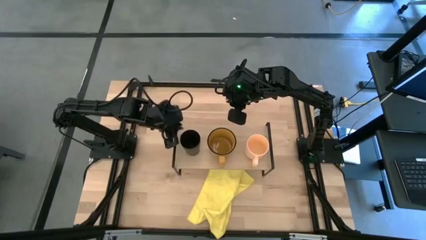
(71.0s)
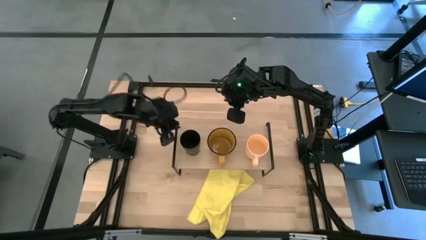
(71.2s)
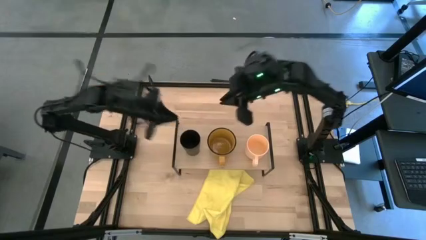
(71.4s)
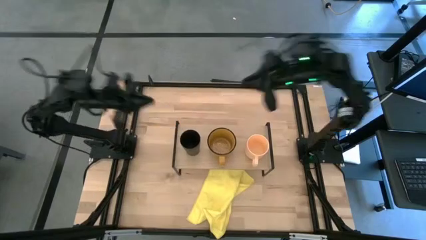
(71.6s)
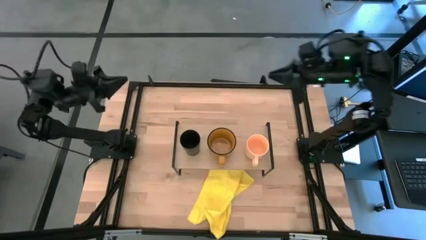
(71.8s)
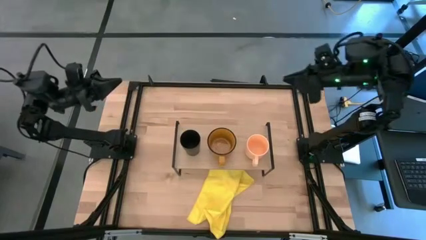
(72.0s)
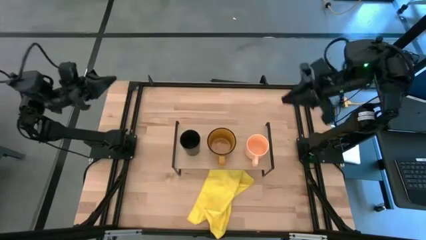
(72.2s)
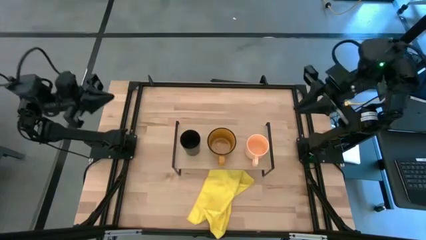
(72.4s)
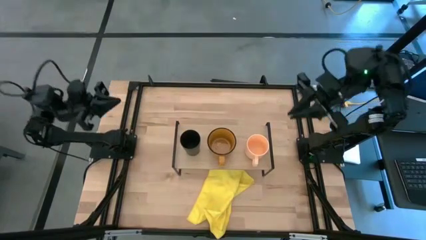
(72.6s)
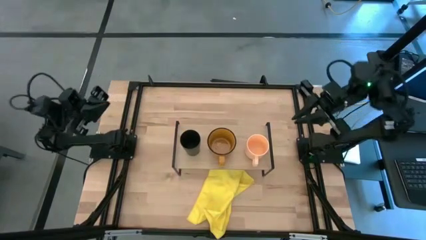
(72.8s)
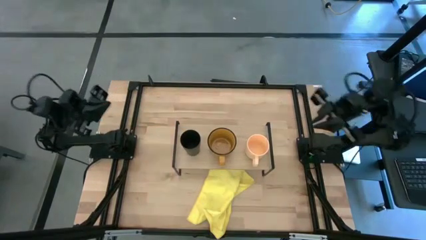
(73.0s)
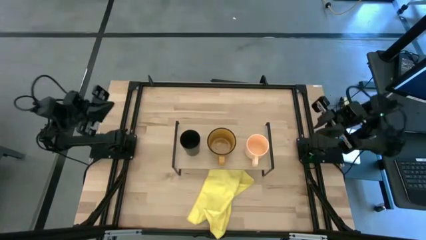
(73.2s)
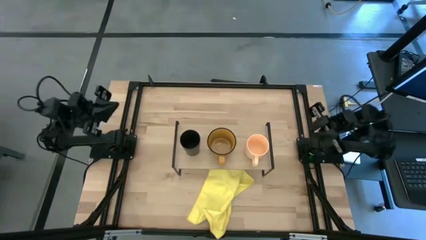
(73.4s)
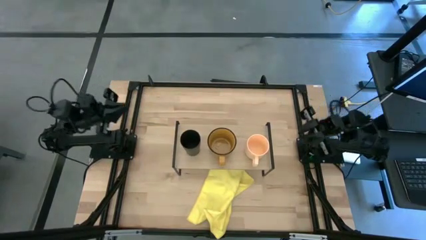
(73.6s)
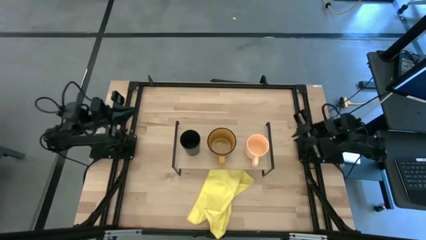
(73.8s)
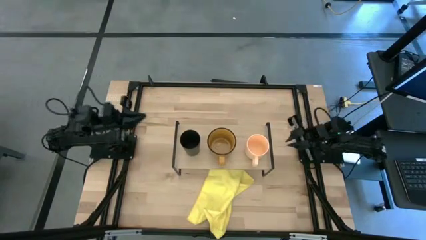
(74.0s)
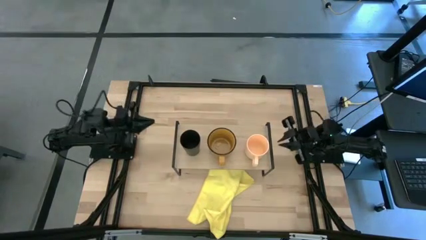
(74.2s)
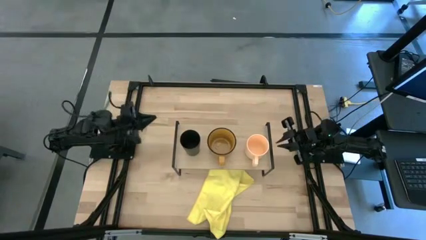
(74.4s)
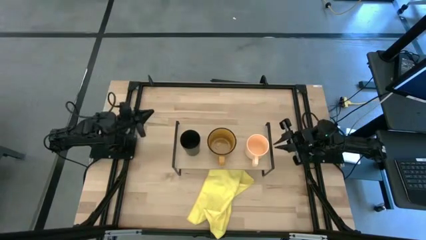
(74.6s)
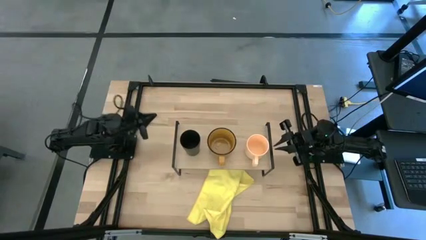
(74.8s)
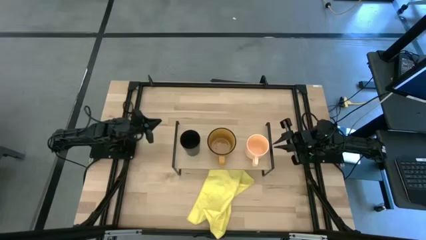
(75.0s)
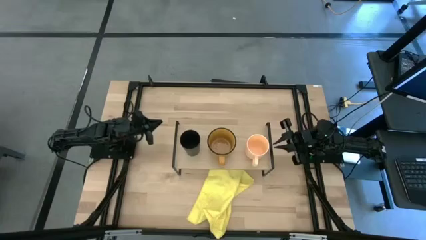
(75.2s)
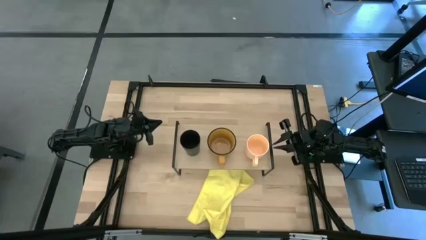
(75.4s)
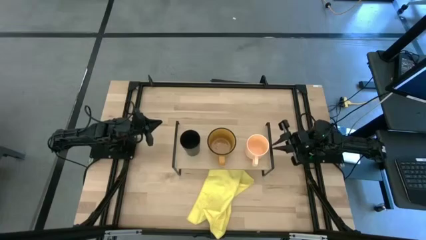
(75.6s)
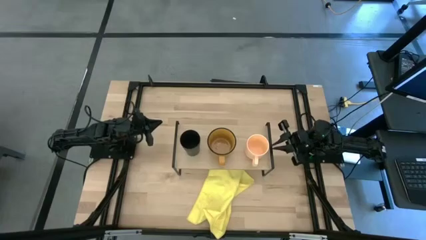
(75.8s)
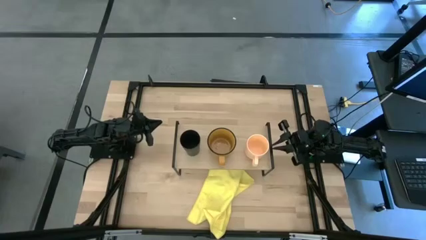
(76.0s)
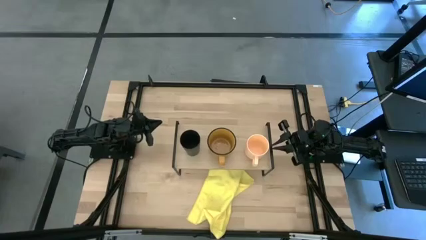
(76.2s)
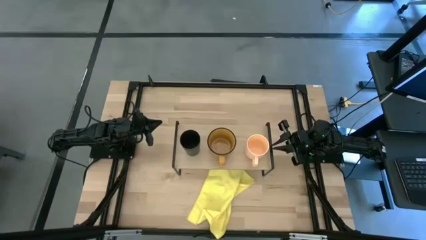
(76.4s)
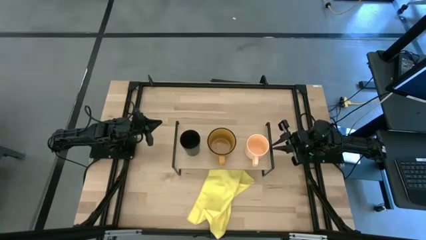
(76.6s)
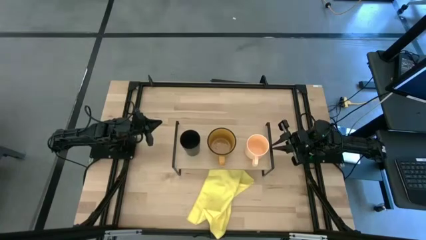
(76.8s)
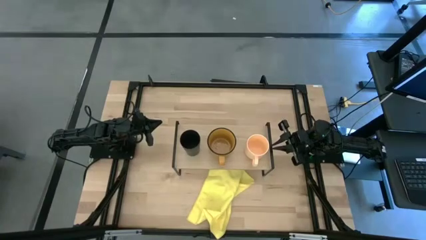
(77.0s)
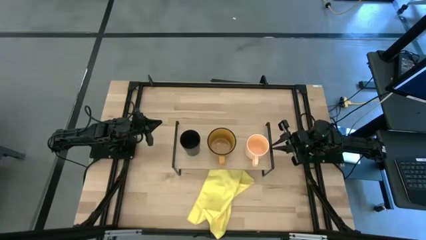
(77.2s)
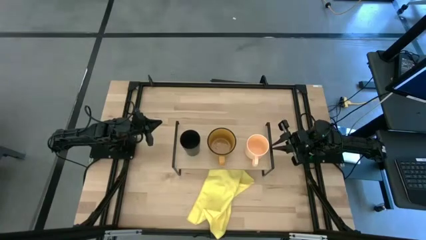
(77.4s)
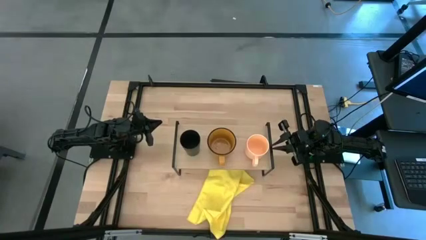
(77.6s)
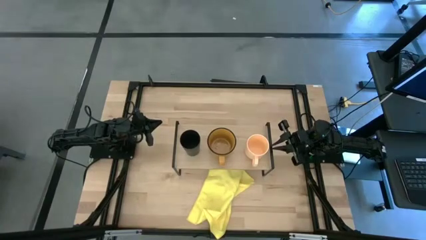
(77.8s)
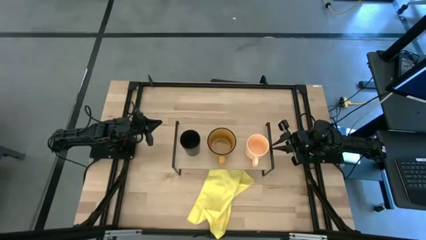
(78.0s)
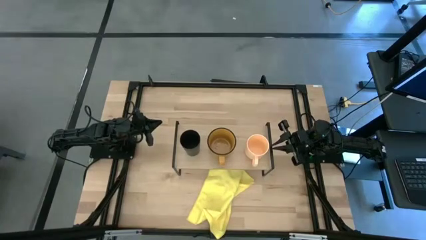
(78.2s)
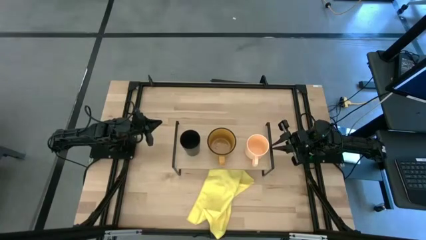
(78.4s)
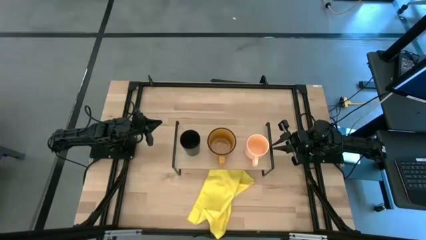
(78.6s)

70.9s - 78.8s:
Task: Stack small to large cups/mugs on shelf
Return to Home Position

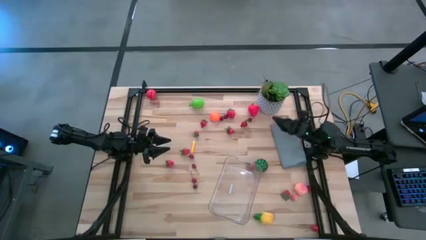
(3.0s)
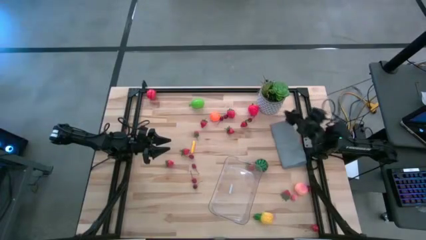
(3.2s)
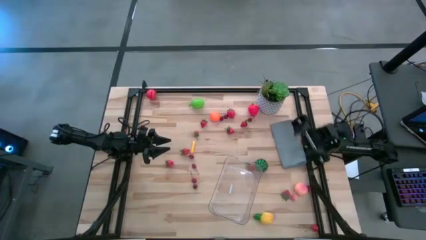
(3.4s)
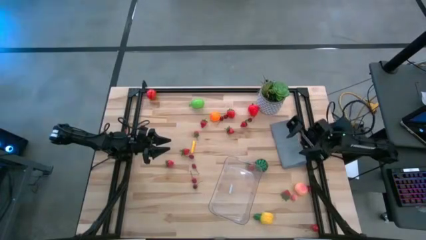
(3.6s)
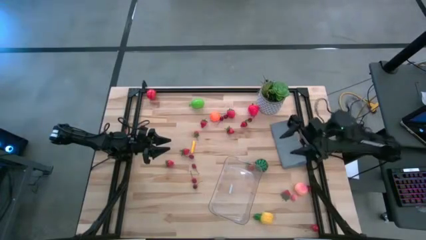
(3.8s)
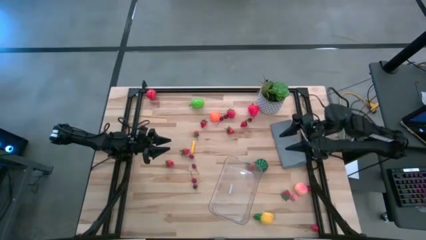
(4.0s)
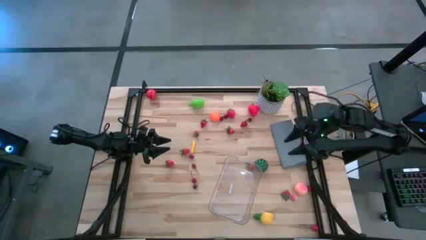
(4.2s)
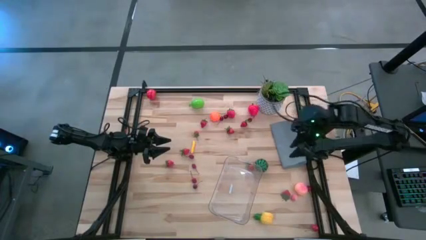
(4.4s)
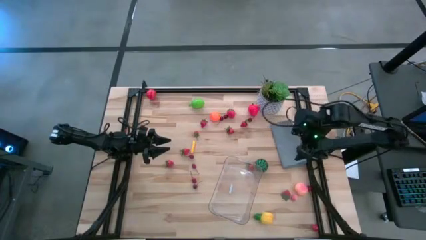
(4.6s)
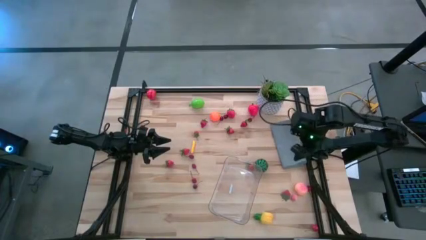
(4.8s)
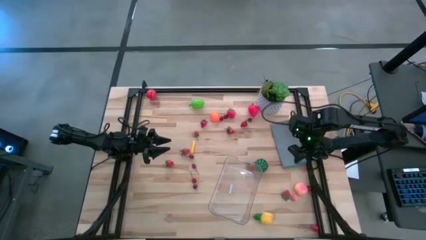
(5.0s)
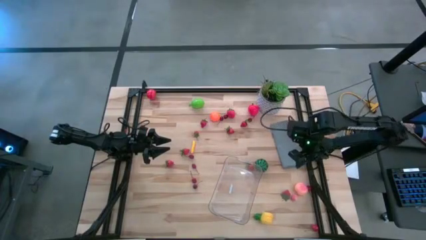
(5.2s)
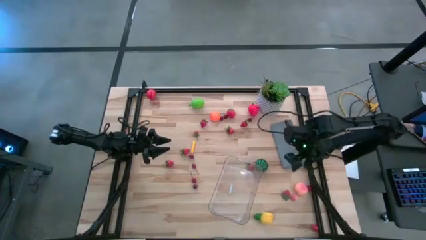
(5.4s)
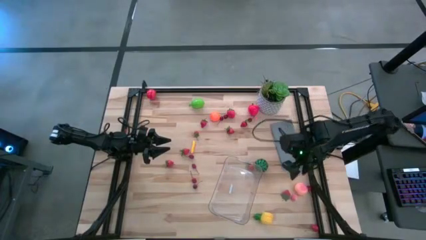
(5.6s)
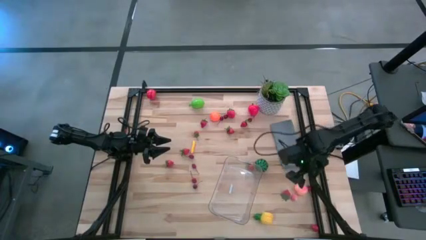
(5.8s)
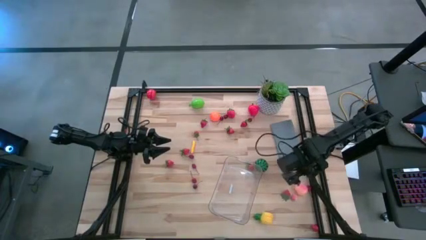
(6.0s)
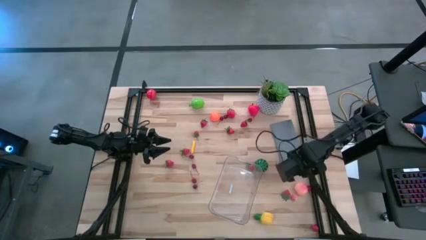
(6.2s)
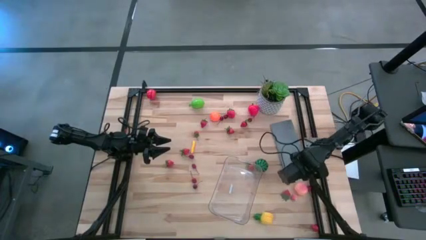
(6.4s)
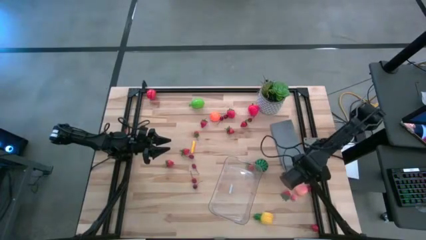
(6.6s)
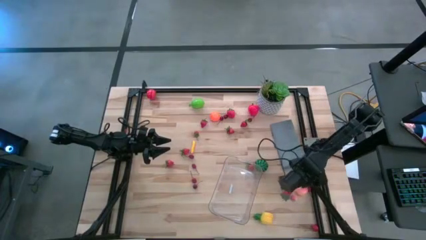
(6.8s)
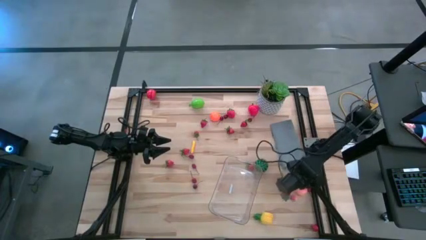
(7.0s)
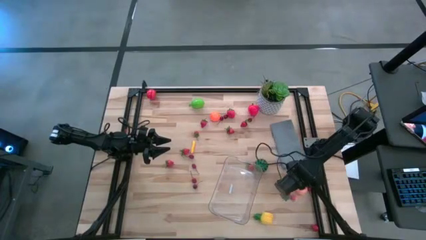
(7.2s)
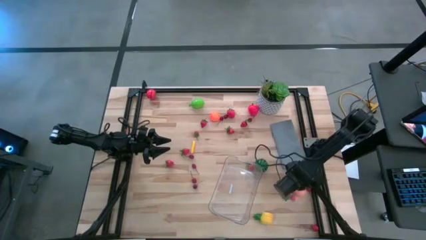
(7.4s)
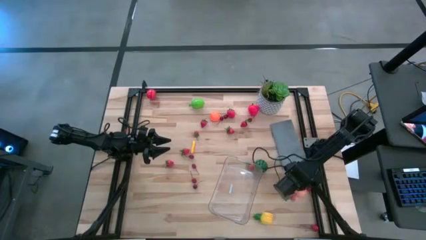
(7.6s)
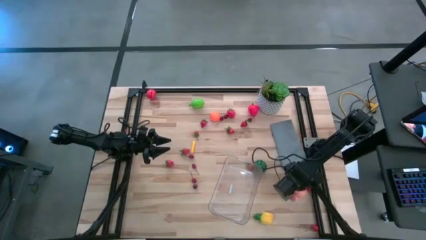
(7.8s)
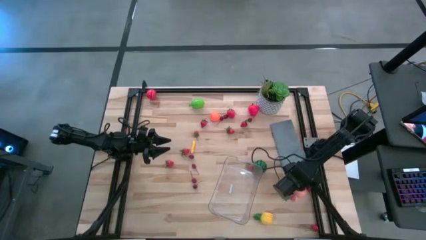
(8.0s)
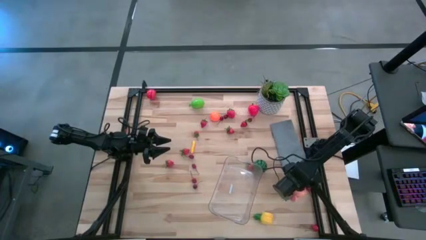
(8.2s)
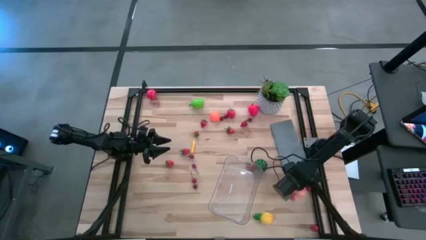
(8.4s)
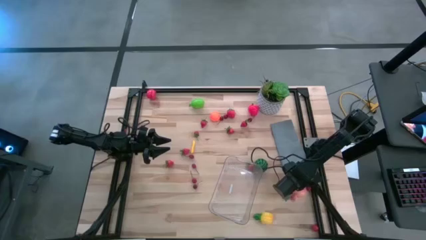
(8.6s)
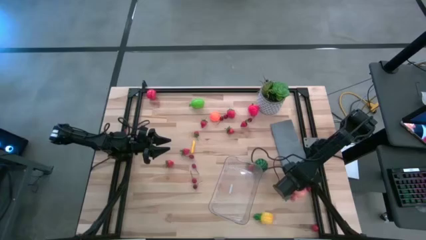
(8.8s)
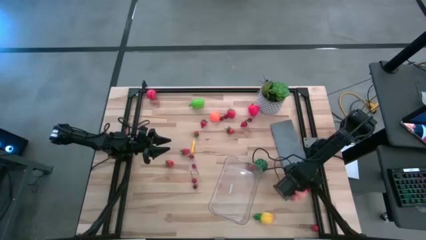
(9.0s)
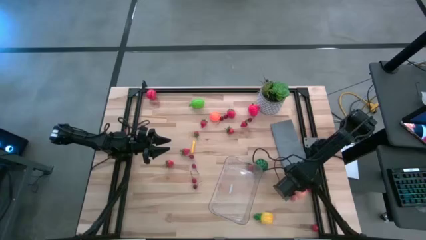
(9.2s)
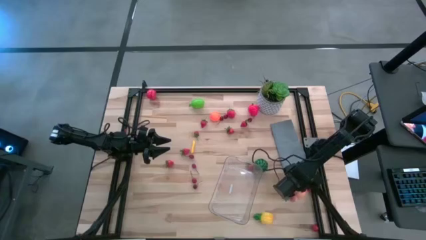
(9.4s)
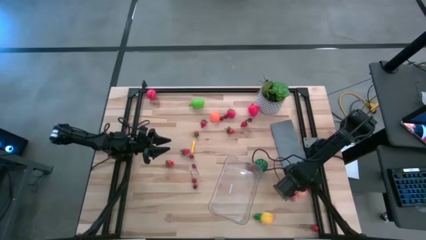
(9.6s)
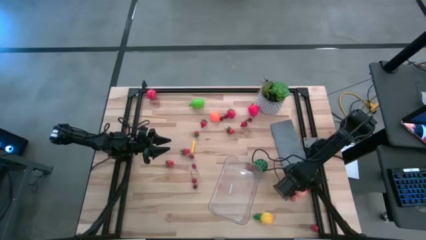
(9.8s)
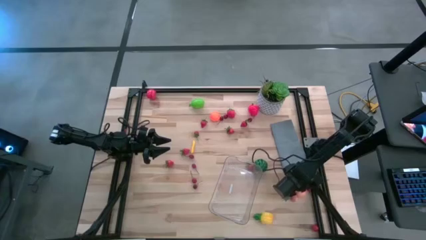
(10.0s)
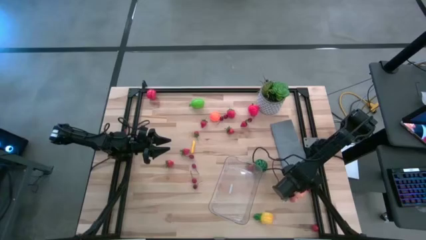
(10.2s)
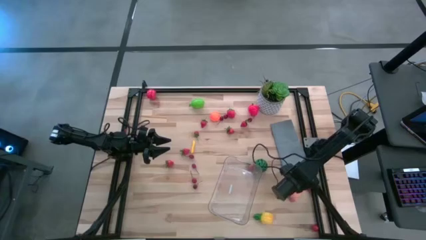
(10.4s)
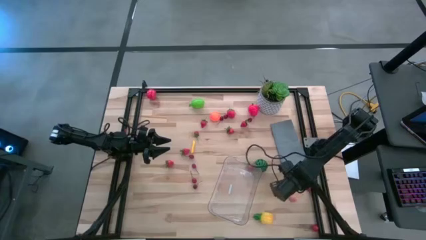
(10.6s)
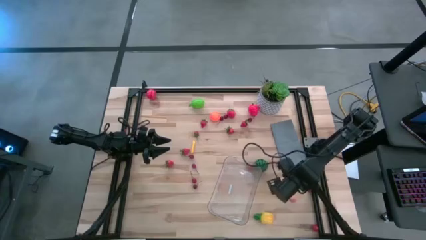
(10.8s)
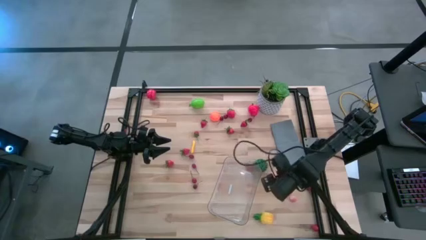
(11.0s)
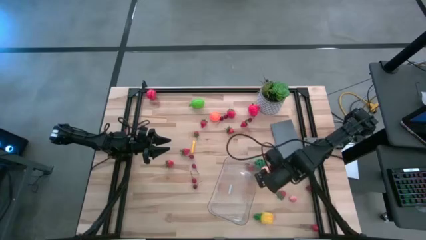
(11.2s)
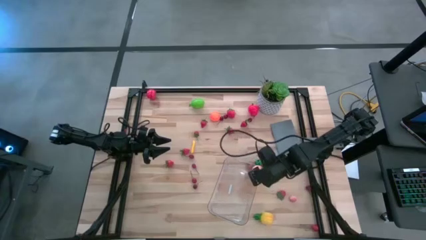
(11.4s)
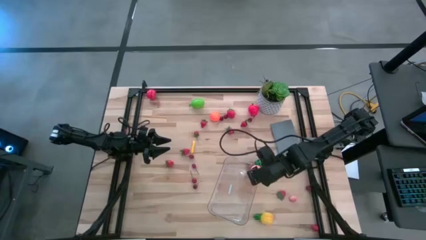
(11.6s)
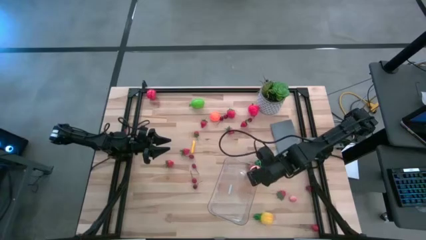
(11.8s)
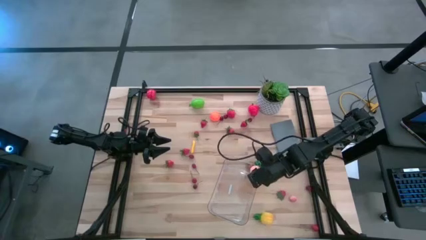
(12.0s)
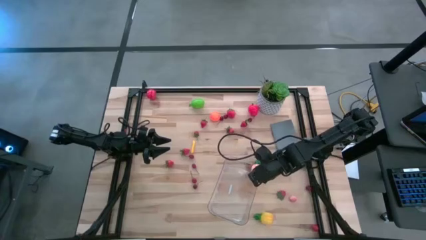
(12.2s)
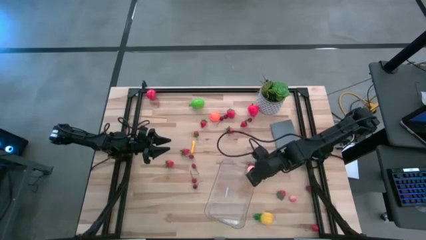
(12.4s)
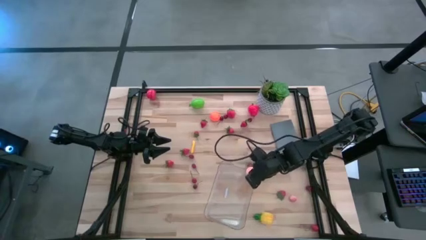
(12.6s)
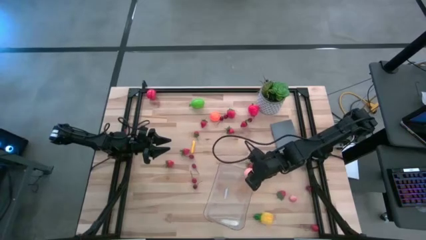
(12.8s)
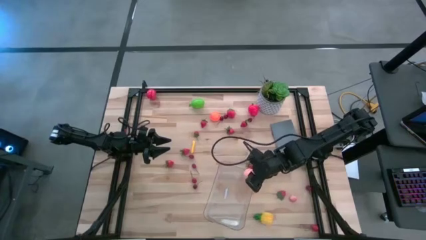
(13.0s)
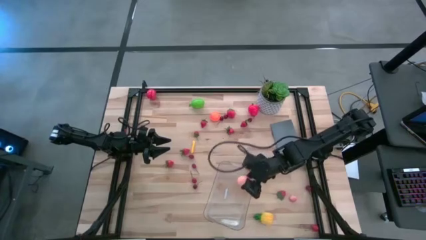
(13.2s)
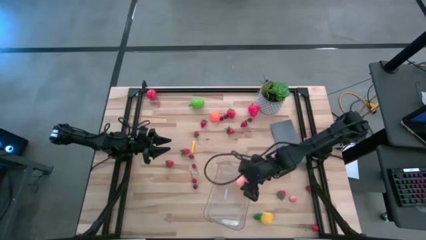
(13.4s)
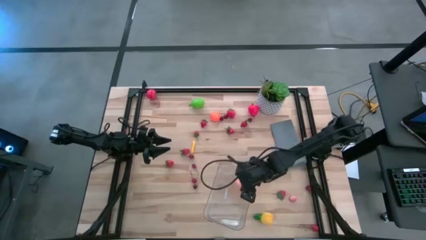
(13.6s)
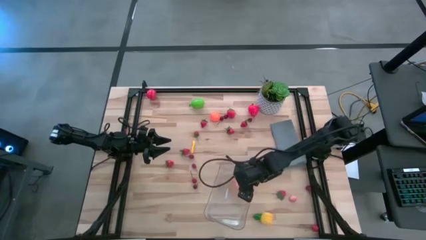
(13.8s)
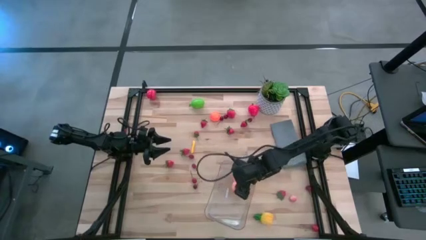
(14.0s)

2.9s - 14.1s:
Task: Pick and placing Produce into tupperware
Put the pink peach into the transparent basket
